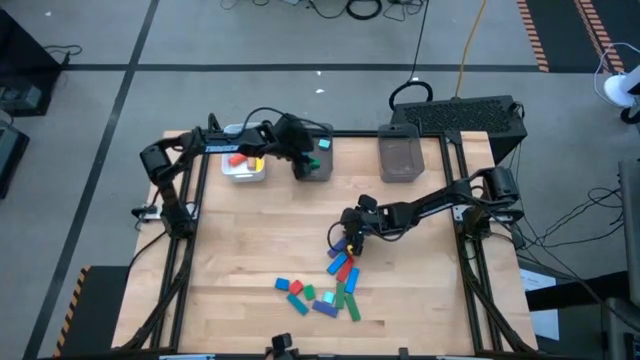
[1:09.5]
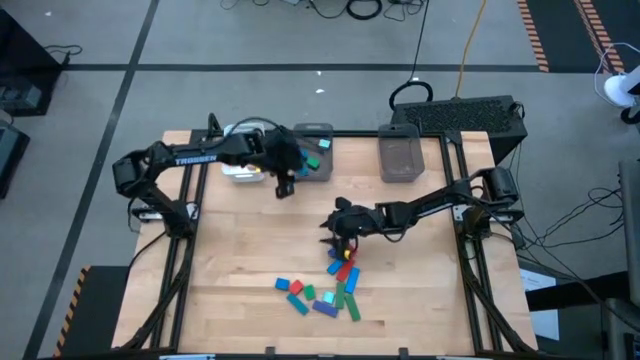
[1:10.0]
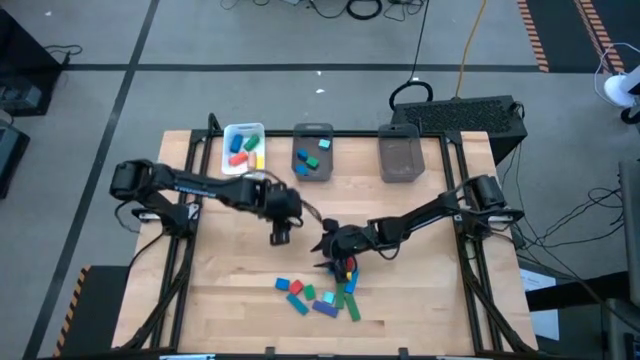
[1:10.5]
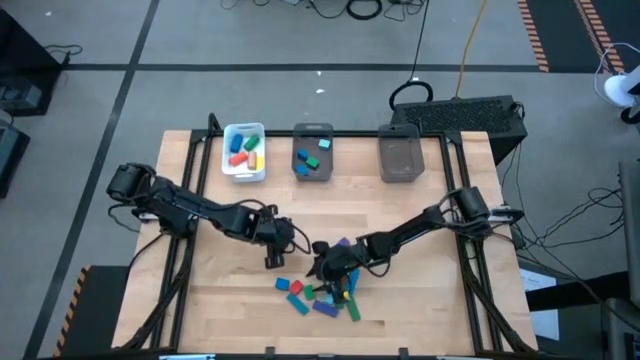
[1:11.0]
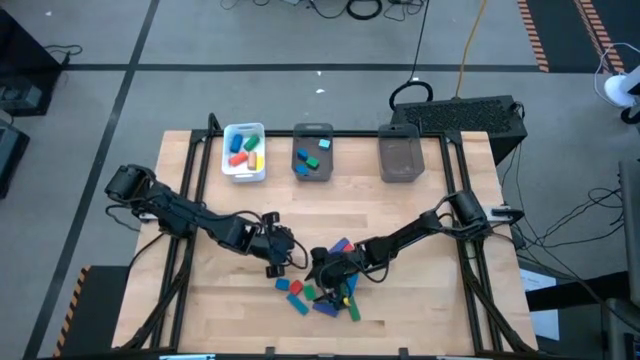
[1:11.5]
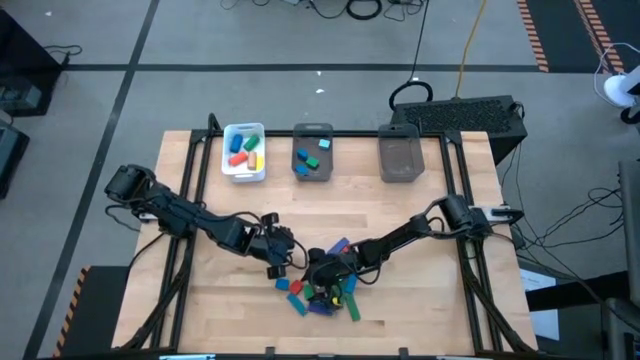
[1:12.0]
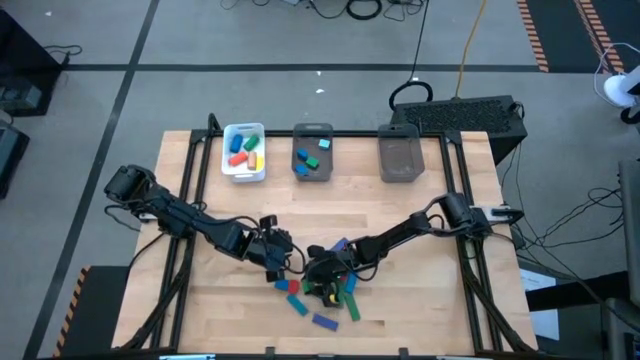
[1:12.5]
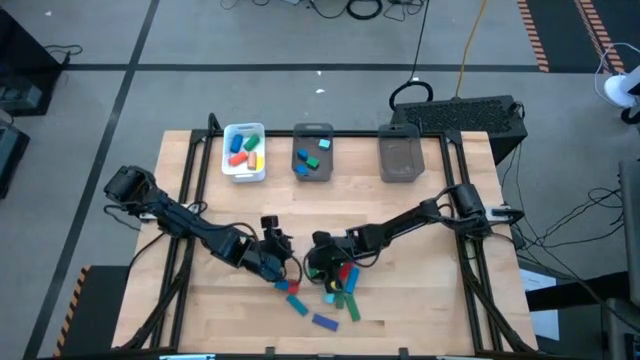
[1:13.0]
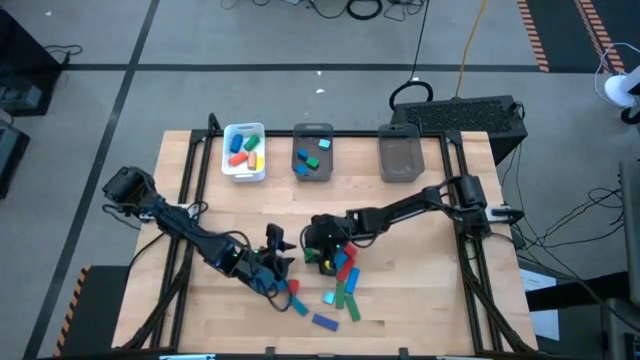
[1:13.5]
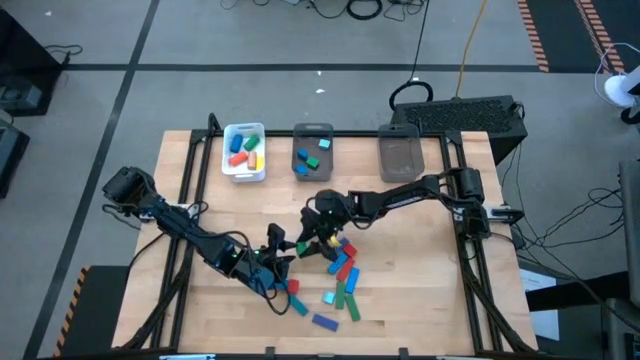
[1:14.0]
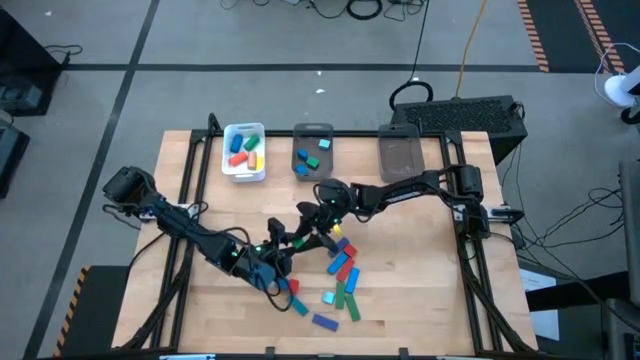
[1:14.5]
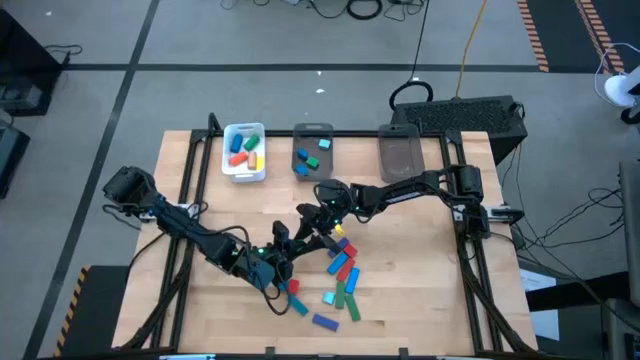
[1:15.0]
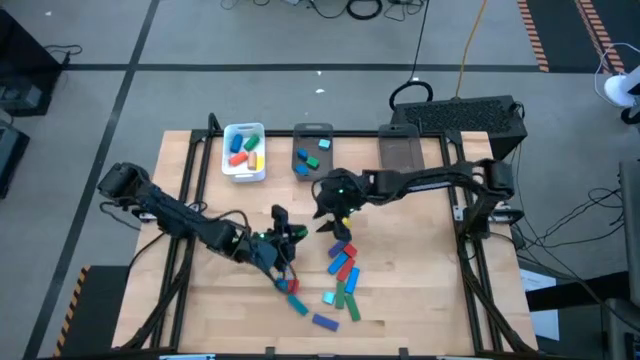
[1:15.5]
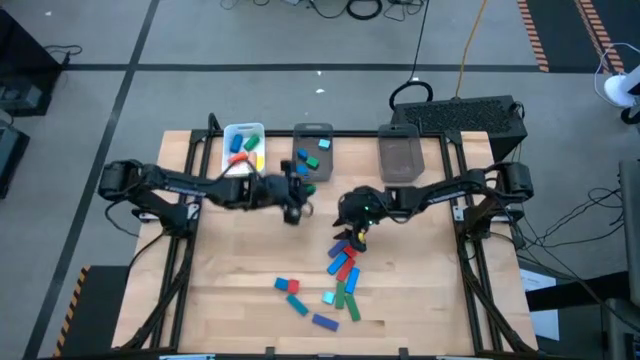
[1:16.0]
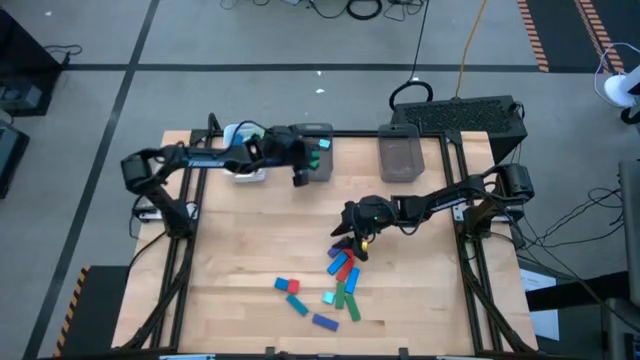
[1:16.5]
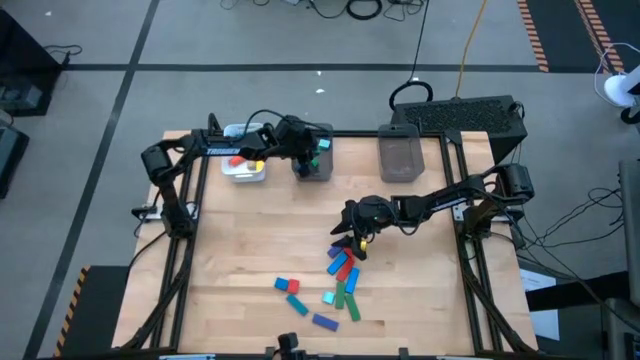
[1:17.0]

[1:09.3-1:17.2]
Task: Sort blocks by size
Put the green half circle block into the left black bin

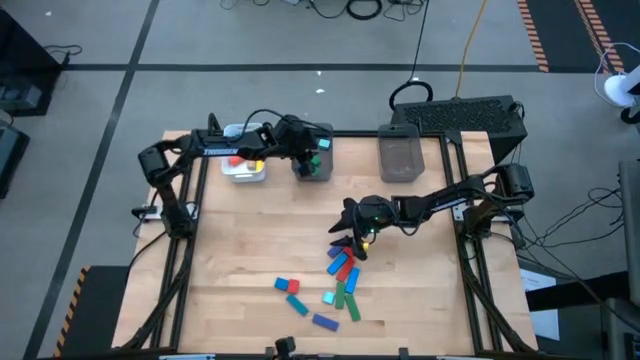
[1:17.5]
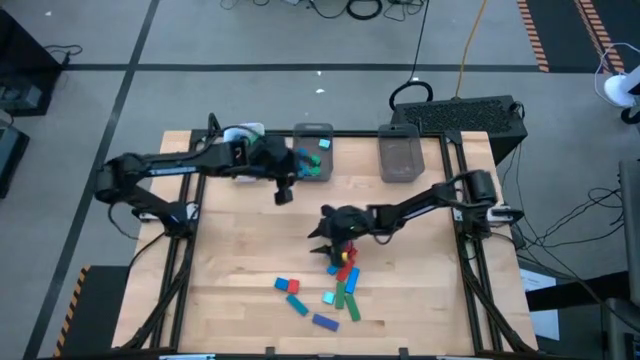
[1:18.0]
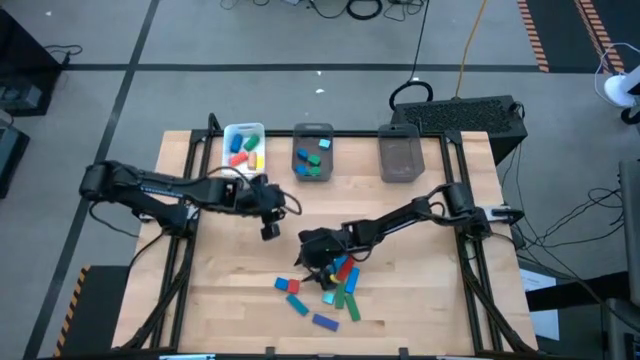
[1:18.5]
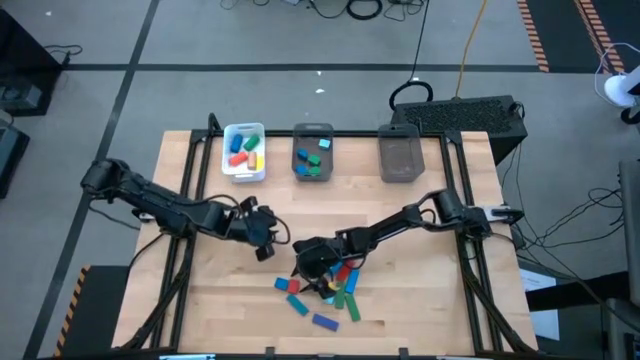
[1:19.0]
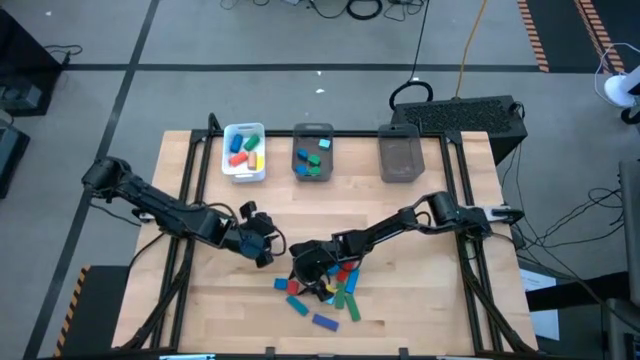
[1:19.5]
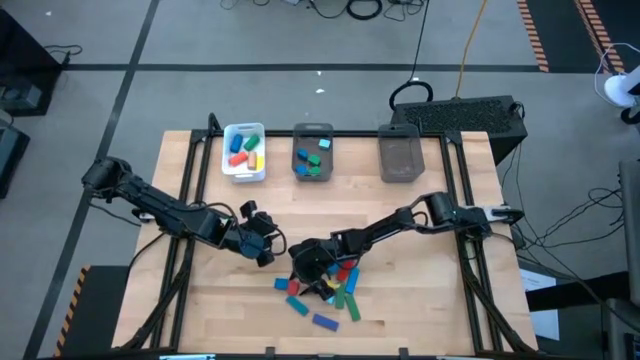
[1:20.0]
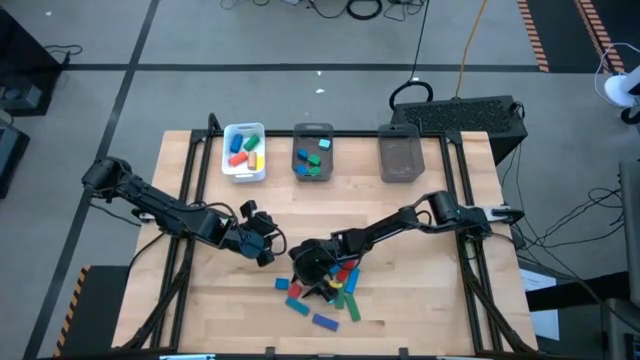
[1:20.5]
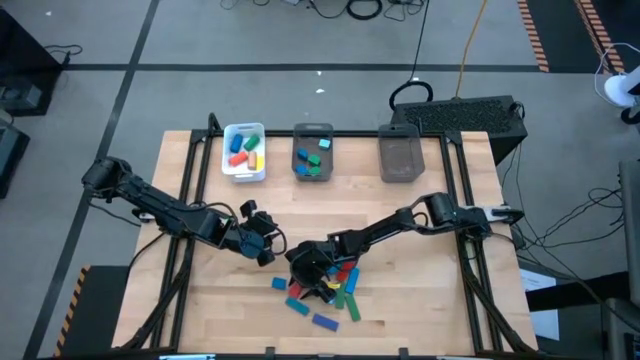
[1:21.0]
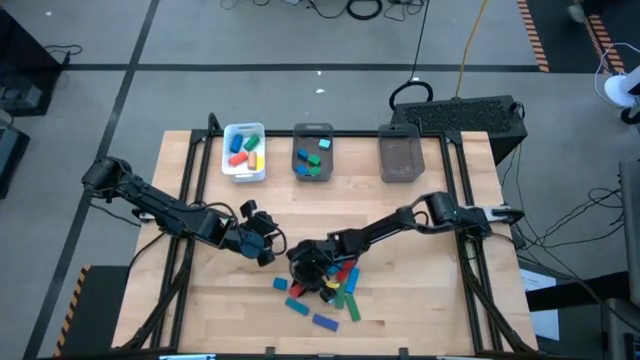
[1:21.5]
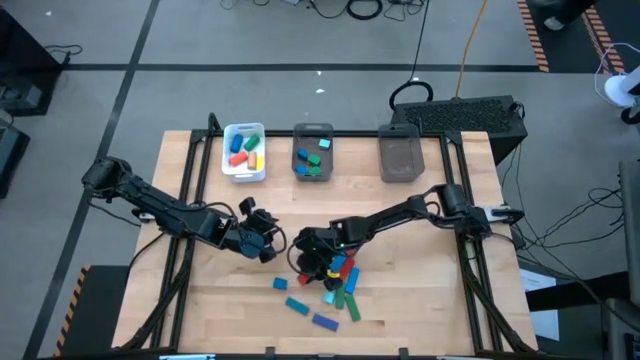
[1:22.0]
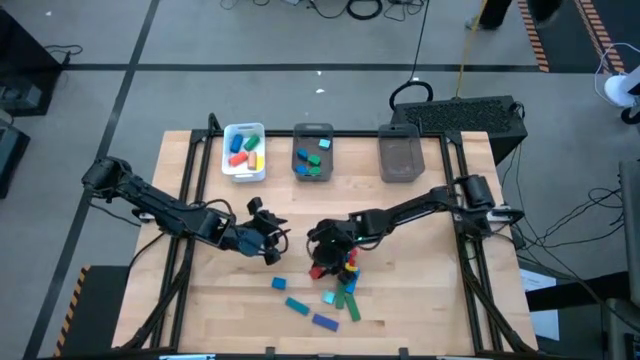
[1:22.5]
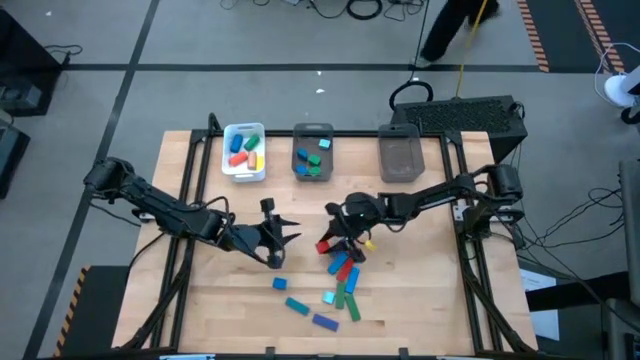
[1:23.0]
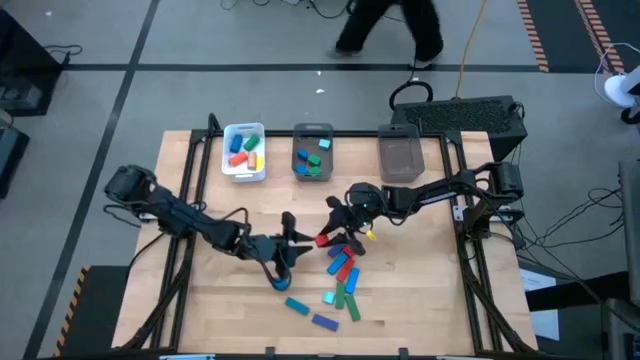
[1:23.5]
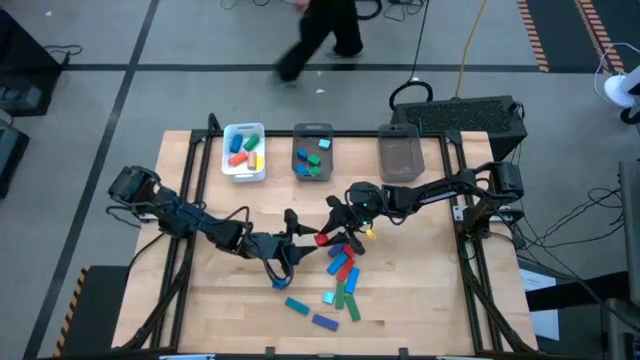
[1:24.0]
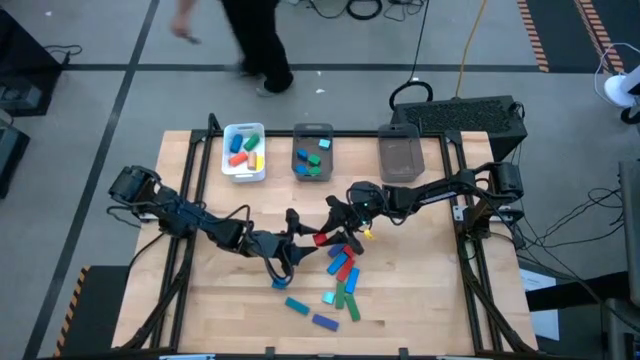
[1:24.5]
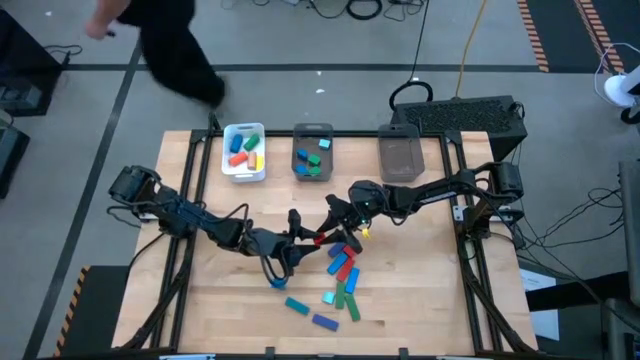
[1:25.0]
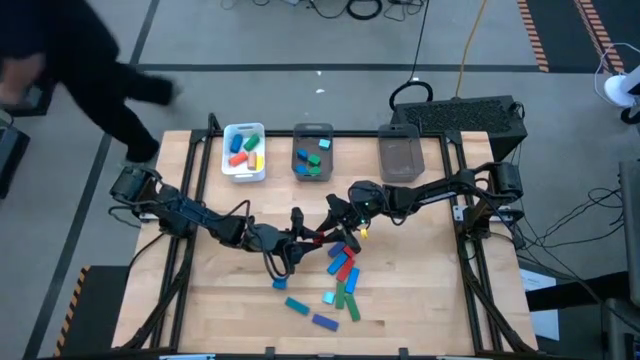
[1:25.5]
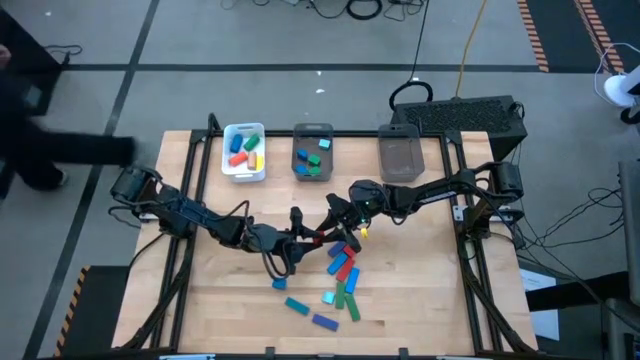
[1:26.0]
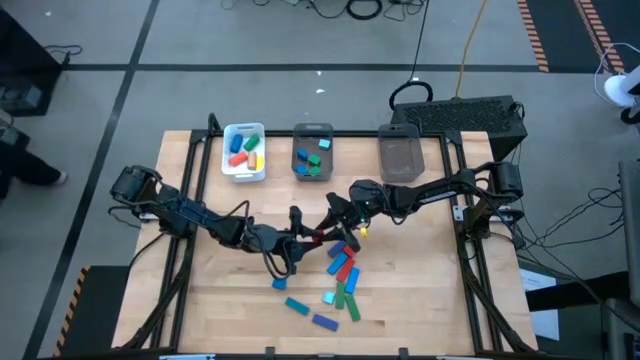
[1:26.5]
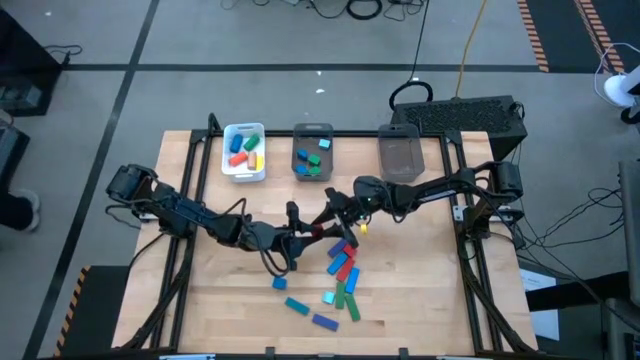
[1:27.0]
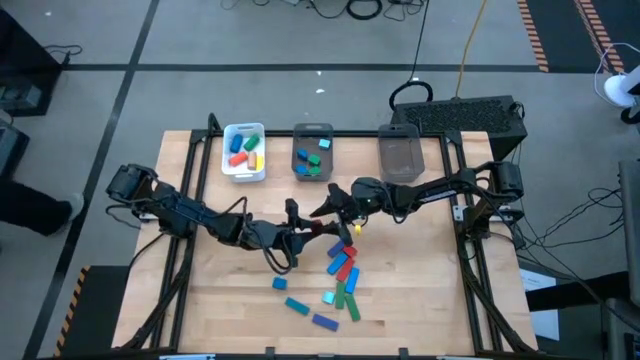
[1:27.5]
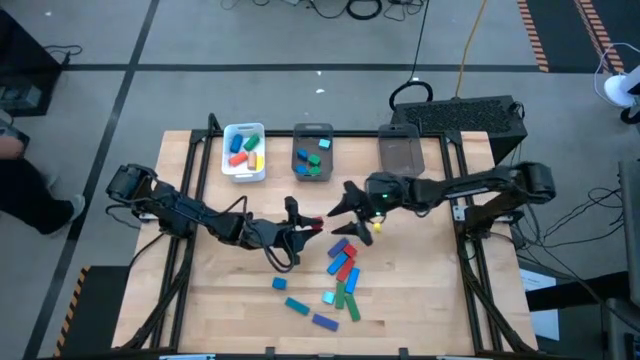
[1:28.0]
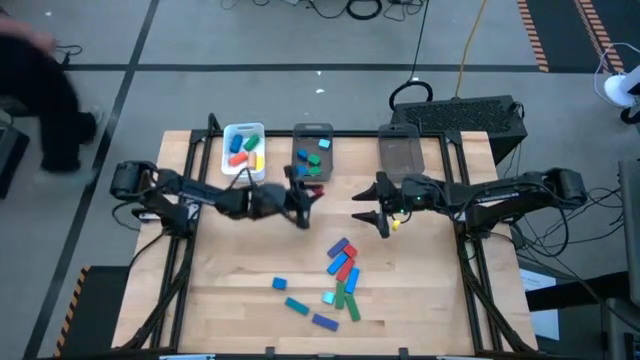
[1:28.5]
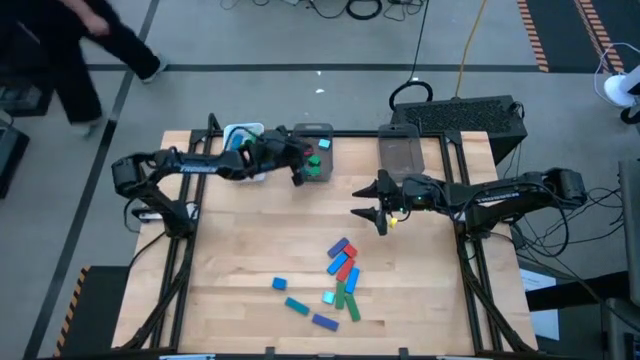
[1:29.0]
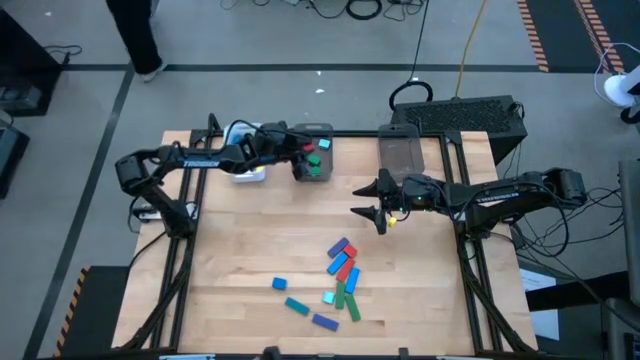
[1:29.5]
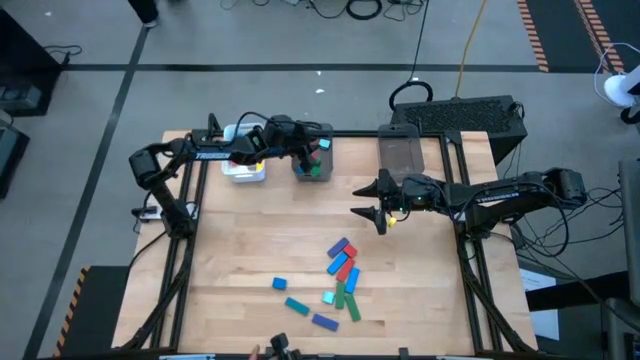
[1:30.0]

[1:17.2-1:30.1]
Put the red half circle block into the left black bin
